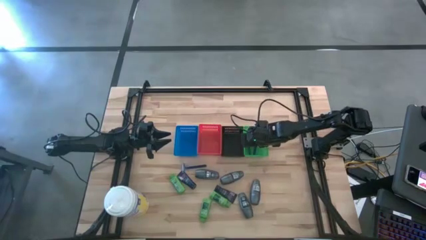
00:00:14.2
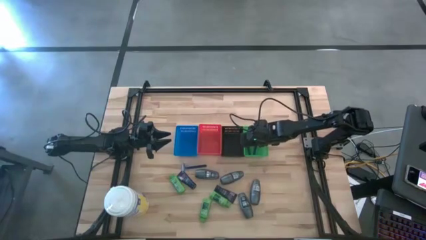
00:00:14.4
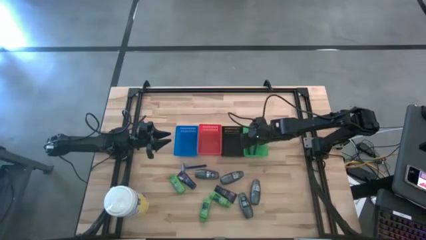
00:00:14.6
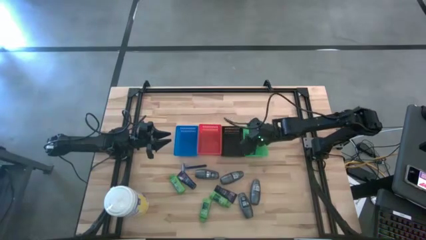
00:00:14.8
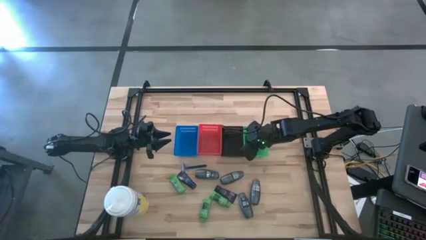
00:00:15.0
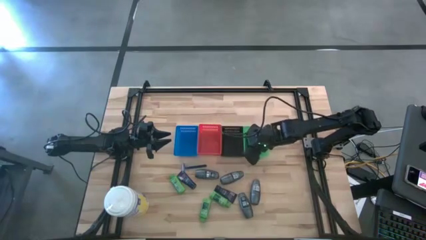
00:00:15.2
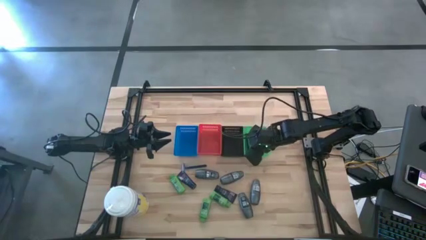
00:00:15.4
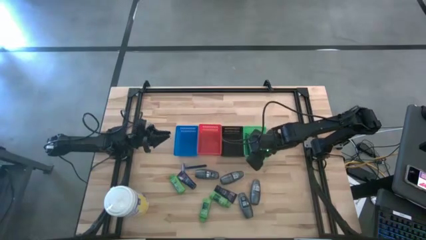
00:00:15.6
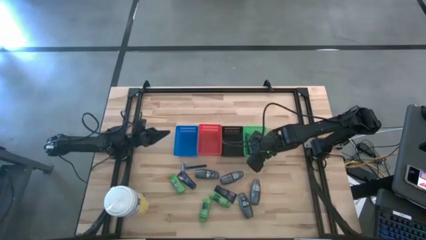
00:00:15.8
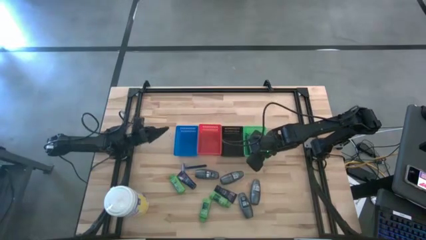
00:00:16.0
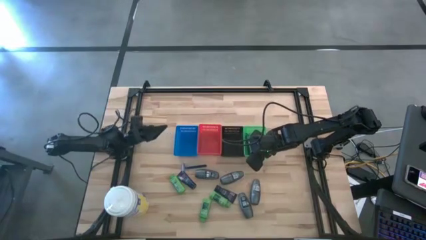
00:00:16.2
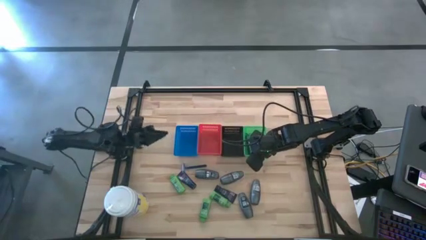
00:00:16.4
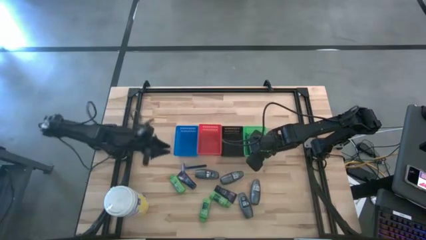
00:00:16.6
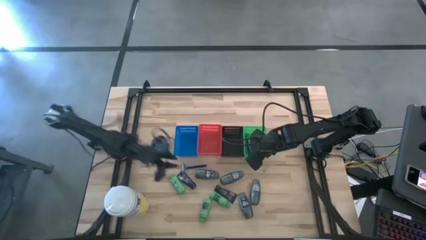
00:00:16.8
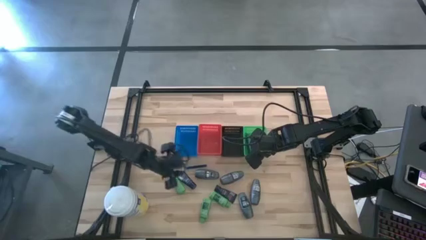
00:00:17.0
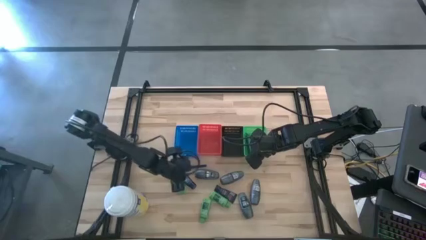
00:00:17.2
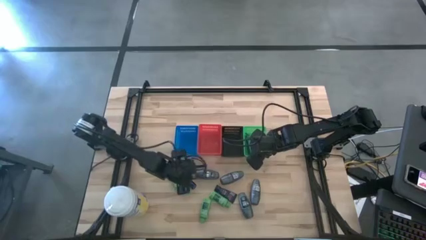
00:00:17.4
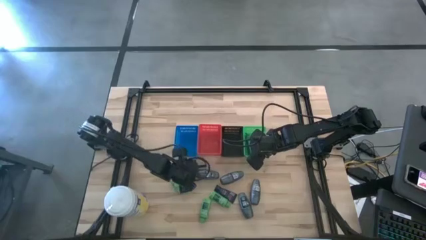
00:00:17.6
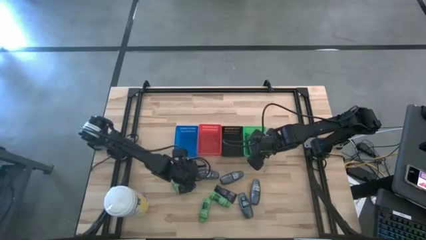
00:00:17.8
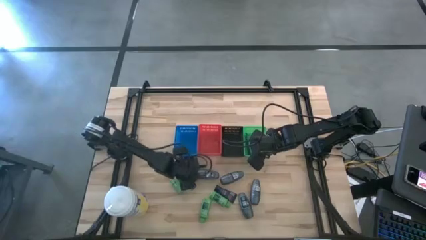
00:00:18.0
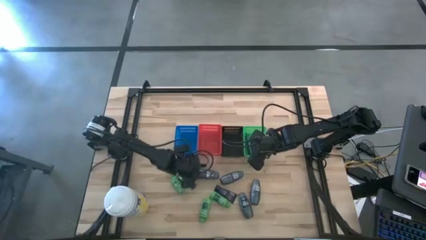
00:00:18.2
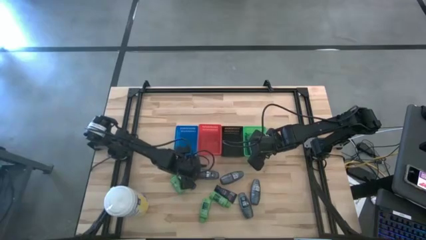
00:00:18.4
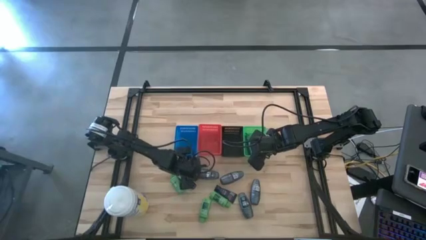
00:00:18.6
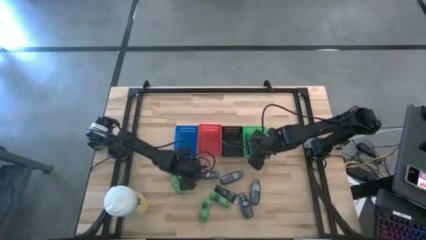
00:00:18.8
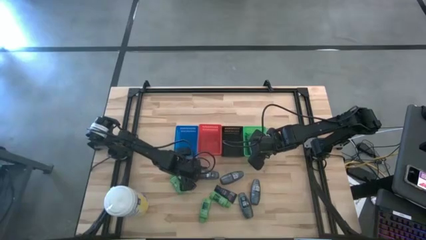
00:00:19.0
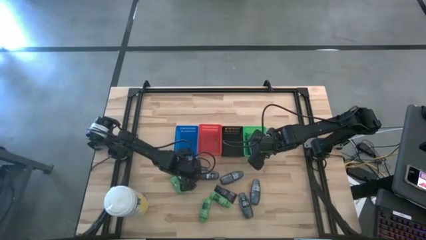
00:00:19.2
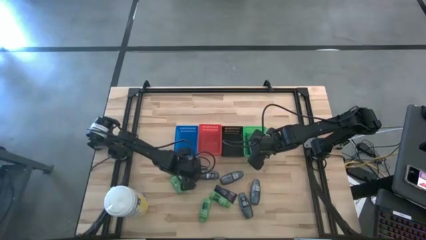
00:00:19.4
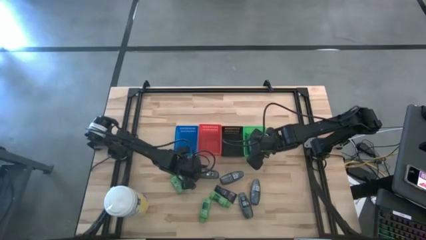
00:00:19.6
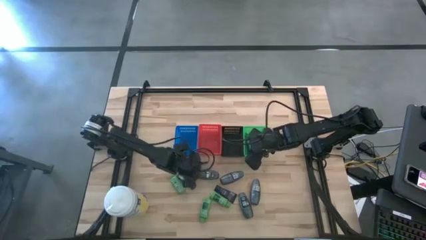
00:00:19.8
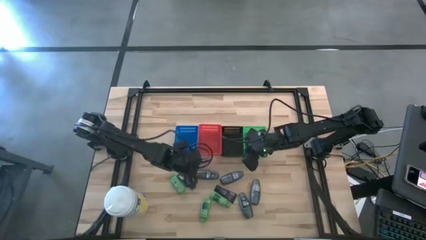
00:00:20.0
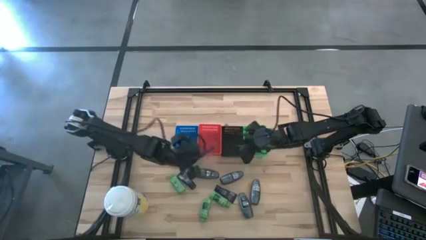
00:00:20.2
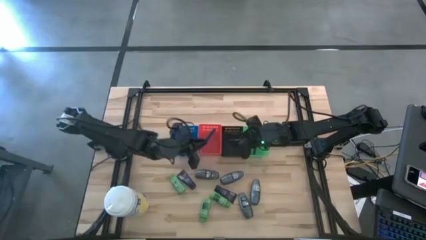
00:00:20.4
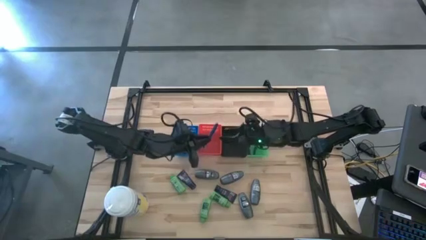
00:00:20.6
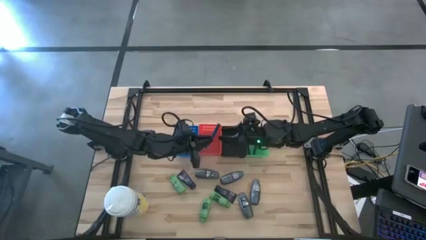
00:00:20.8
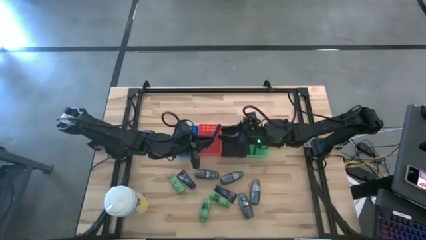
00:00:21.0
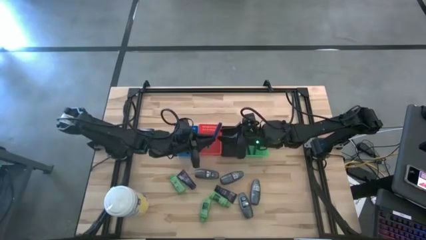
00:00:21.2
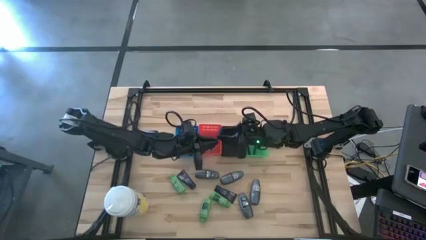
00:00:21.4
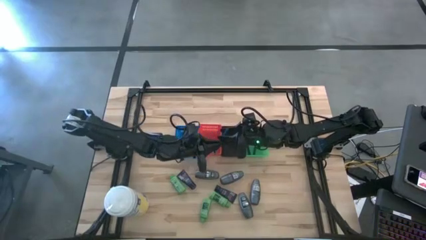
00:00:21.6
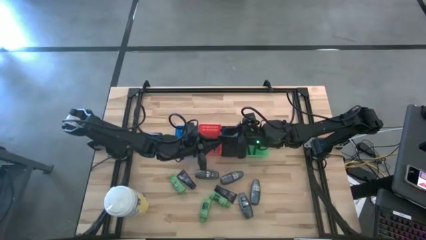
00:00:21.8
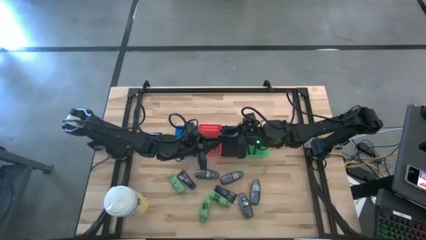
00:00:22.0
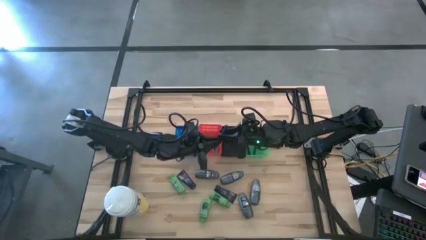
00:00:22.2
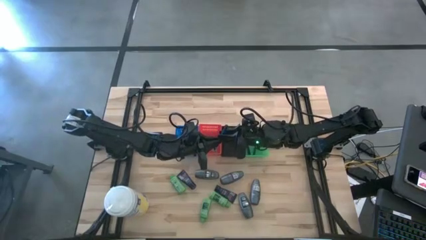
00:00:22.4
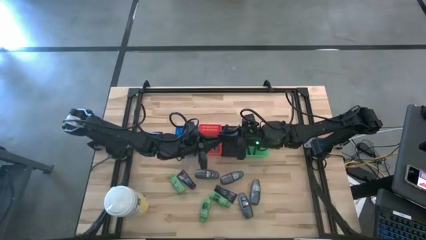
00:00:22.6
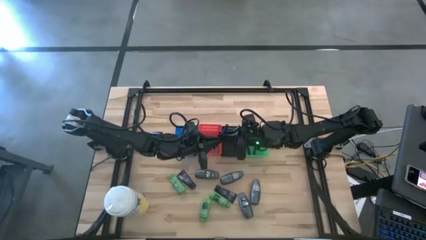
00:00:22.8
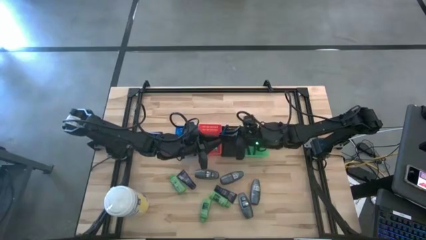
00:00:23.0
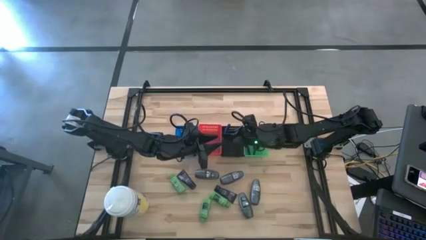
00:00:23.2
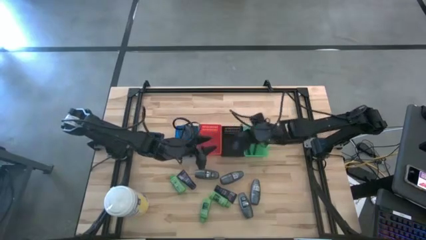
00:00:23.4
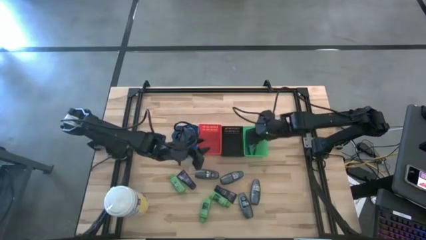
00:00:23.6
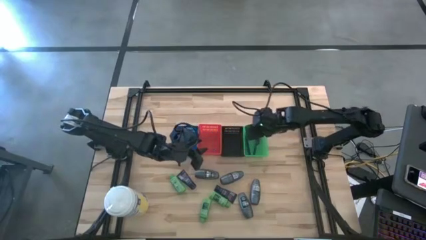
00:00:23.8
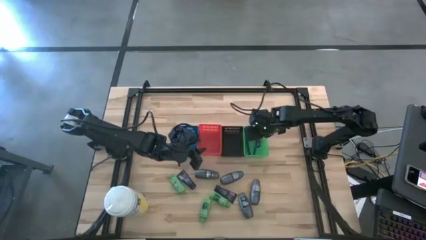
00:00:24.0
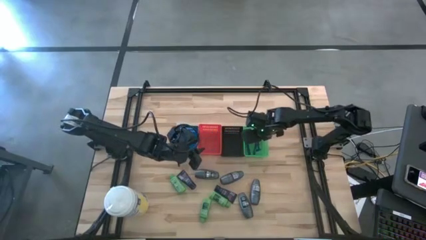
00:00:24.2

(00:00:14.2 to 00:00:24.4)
Task: Pick & Place Travel size toiletries
Put the razor into the green basket

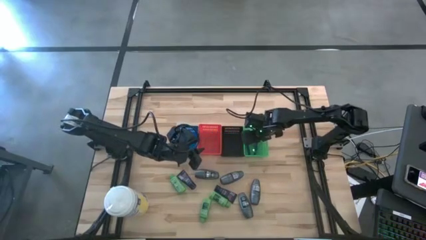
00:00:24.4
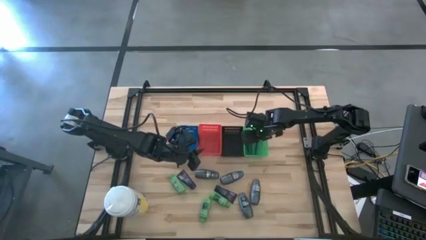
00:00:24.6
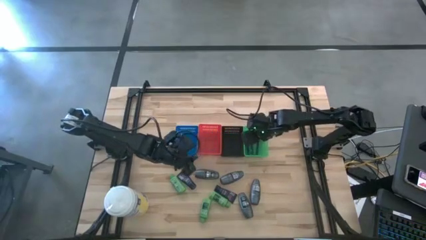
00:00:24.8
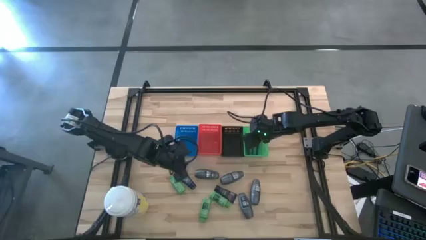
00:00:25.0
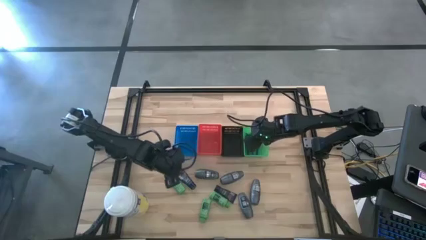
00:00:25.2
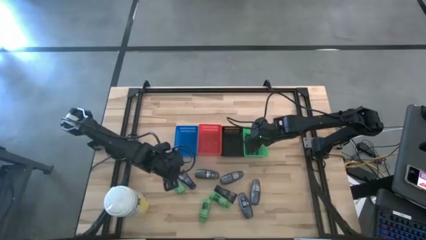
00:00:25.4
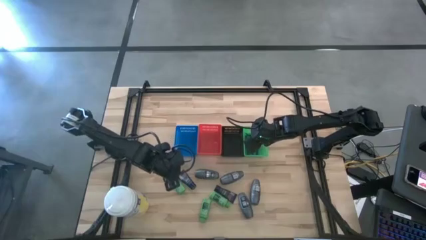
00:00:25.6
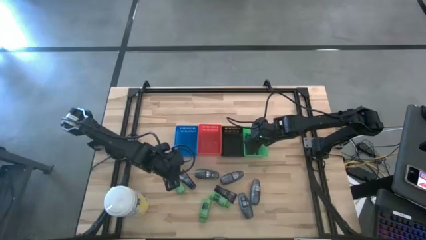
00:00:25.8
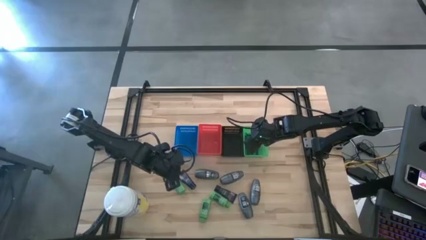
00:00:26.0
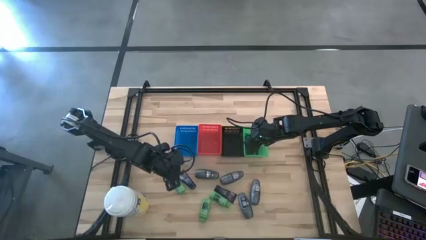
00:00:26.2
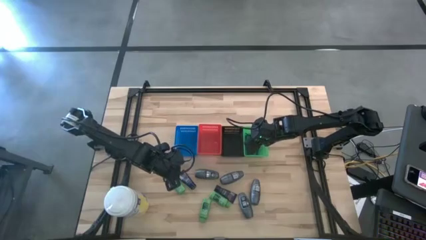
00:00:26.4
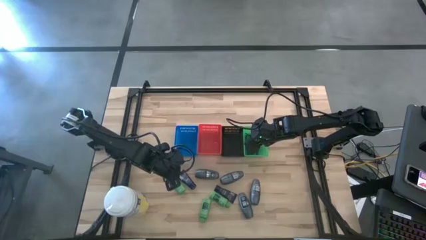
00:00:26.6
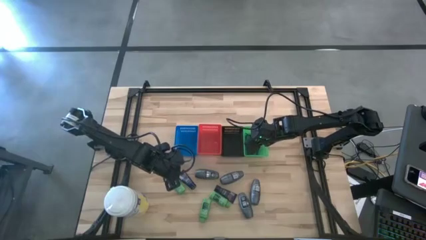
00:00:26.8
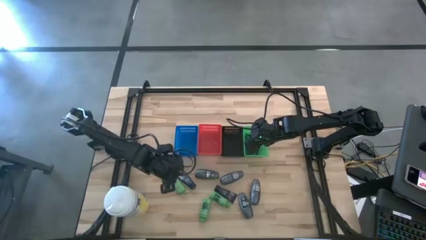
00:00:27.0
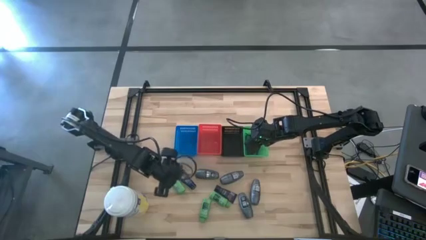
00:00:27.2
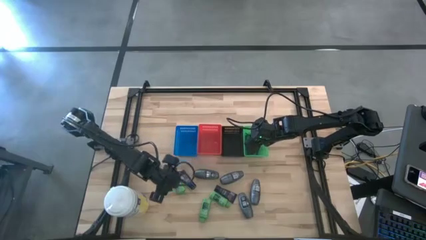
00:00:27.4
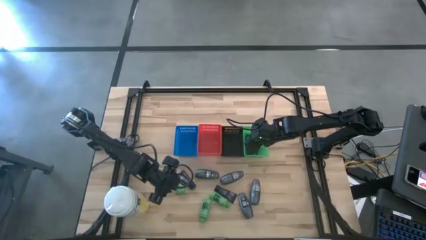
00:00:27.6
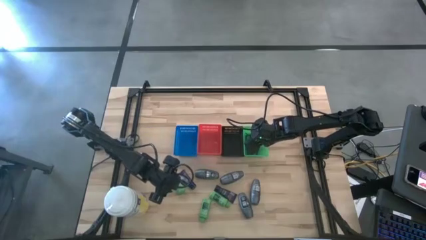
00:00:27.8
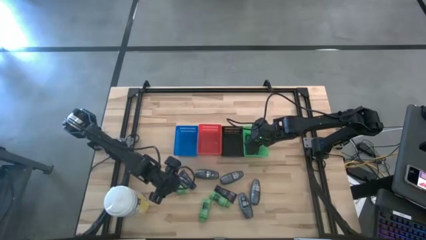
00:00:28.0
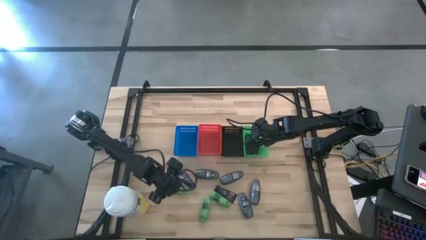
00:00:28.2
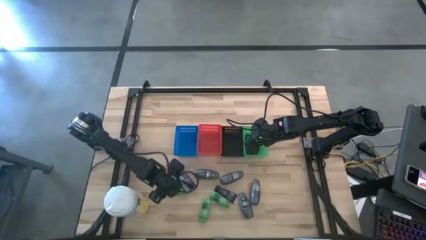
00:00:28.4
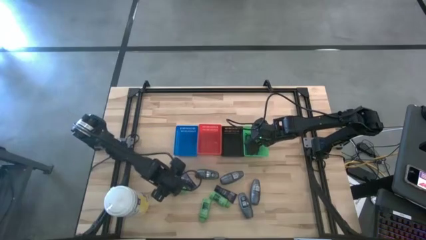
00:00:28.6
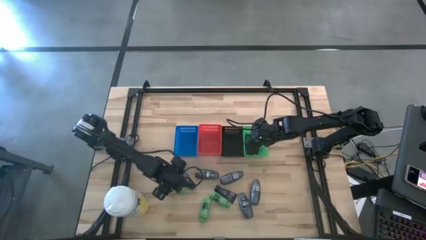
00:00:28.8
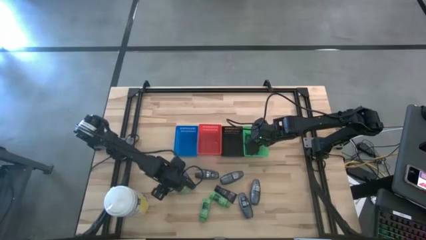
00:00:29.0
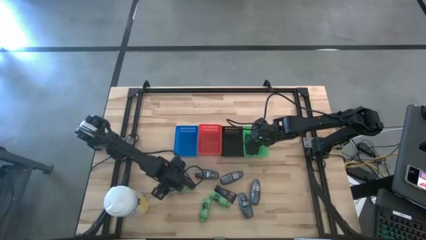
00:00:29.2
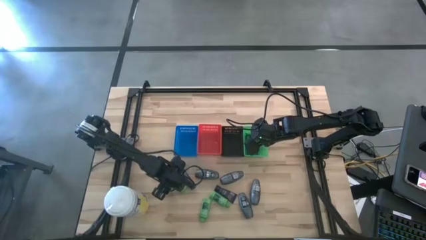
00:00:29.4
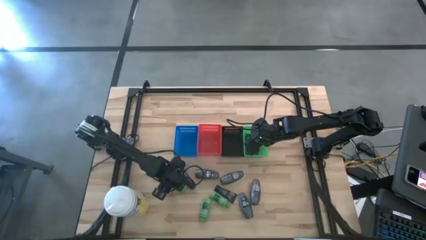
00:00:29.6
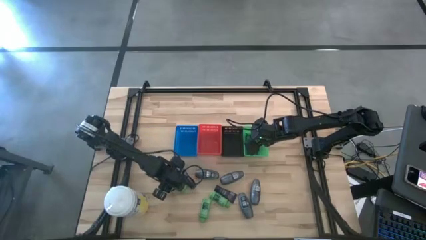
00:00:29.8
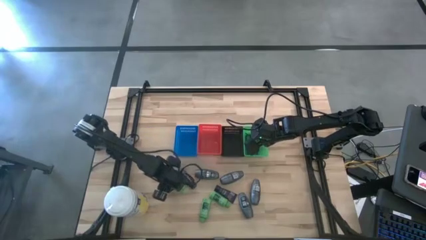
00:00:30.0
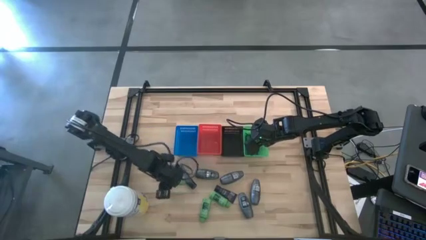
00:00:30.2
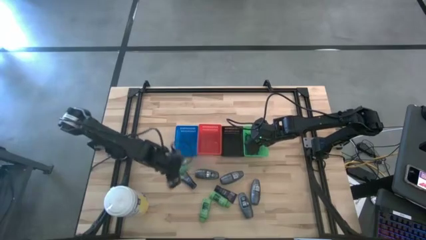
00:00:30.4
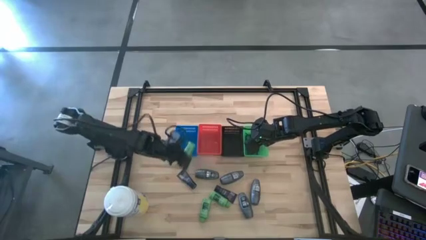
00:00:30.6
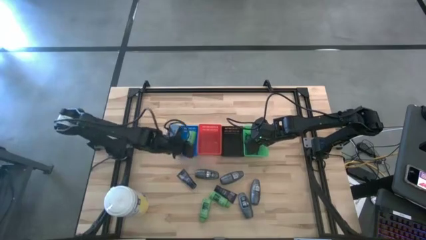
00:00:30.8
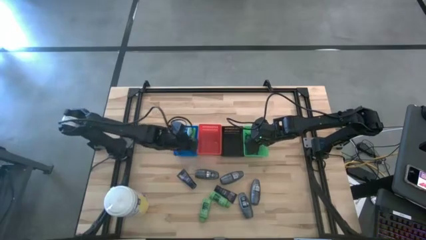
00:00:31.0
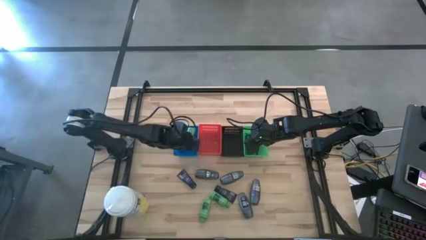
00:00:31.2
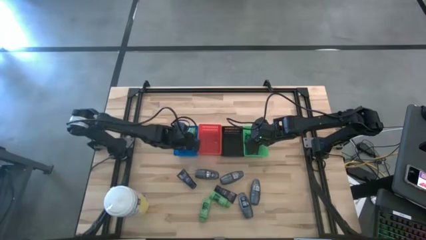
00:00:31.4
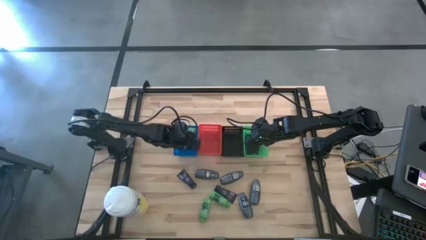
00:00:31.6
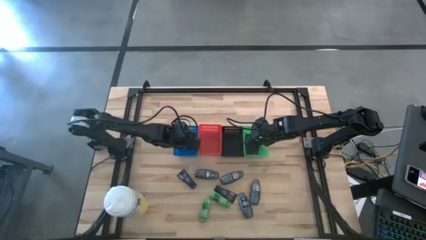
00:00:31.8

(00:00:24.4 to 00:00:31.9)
Put the shampoo into the blue basket
